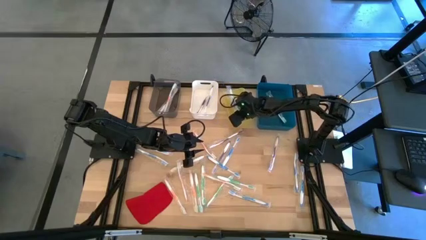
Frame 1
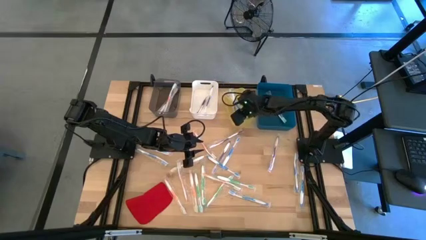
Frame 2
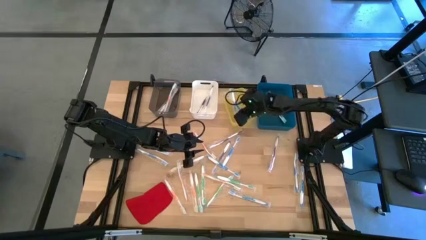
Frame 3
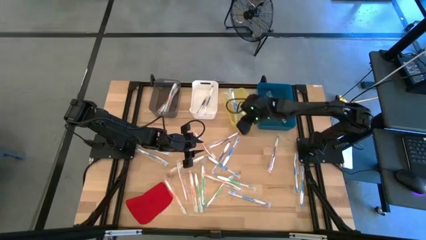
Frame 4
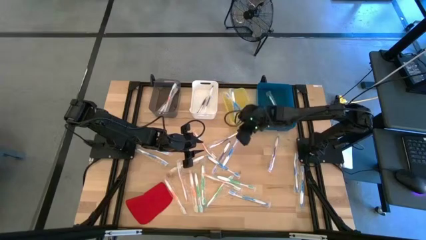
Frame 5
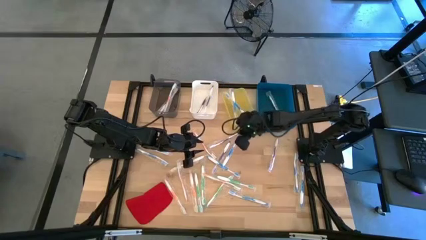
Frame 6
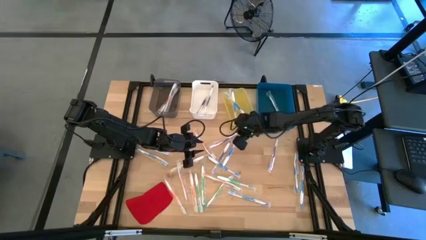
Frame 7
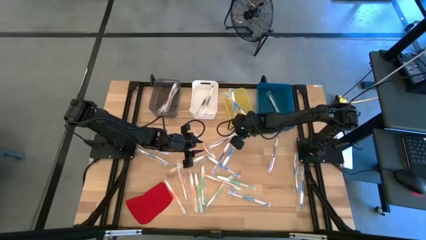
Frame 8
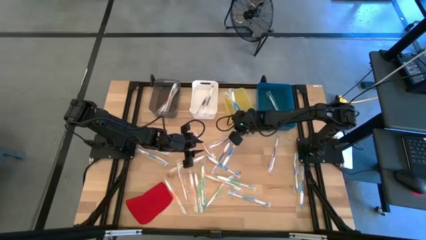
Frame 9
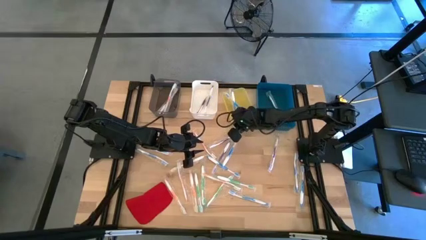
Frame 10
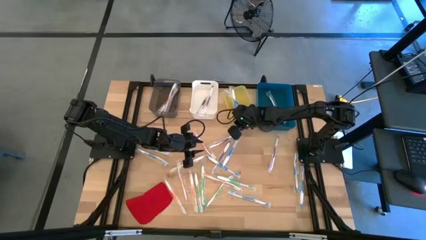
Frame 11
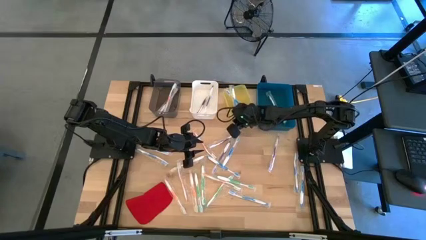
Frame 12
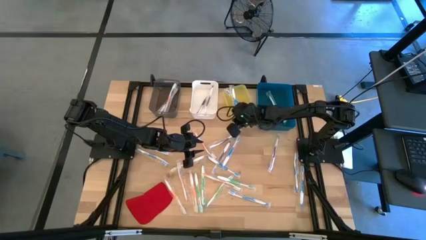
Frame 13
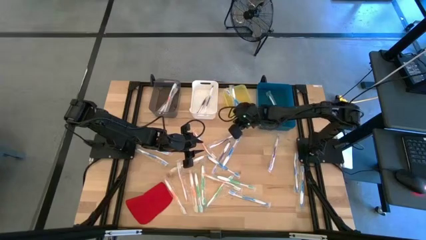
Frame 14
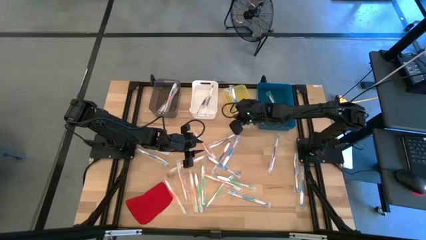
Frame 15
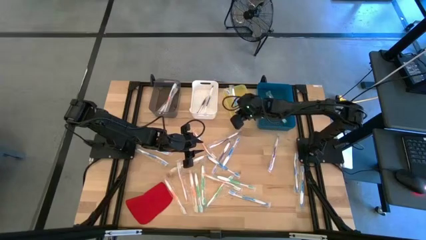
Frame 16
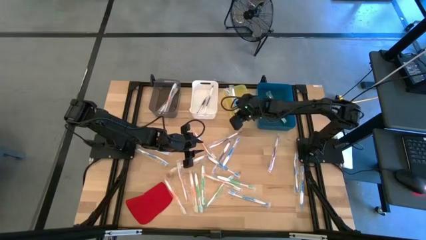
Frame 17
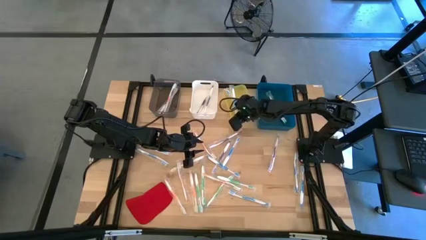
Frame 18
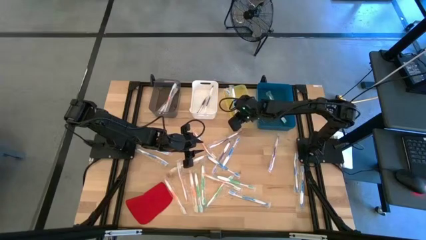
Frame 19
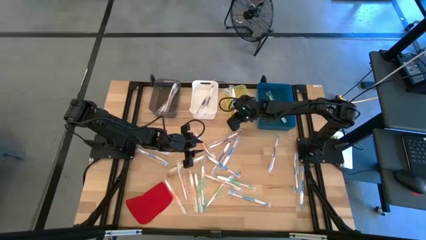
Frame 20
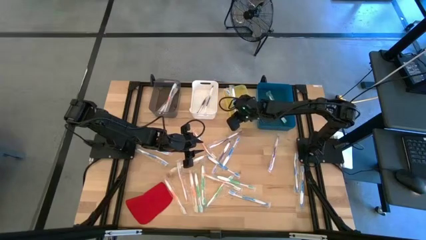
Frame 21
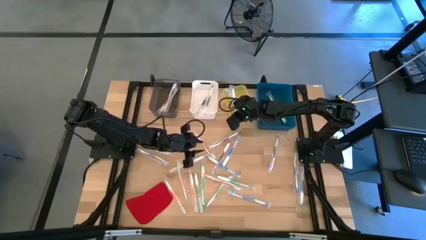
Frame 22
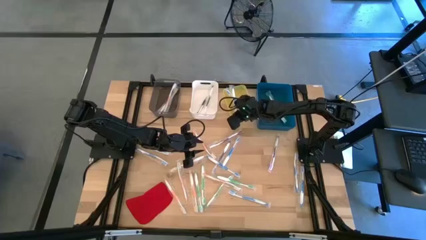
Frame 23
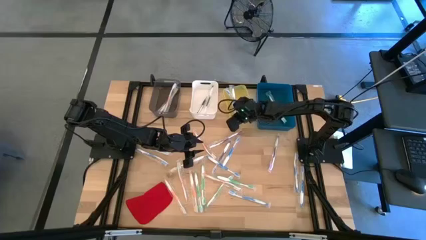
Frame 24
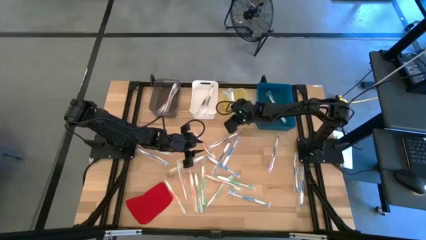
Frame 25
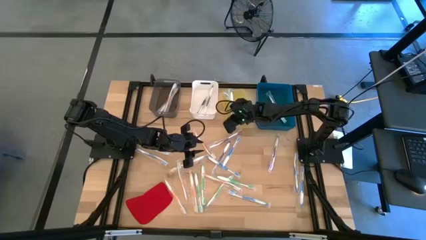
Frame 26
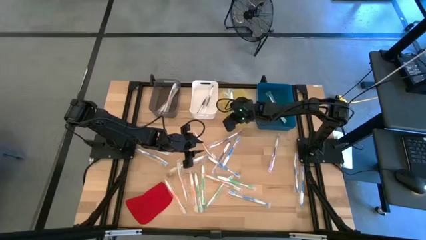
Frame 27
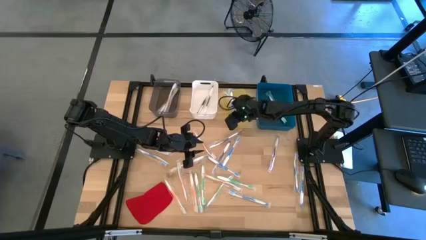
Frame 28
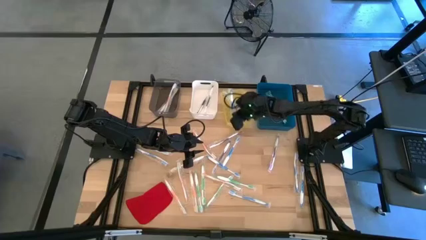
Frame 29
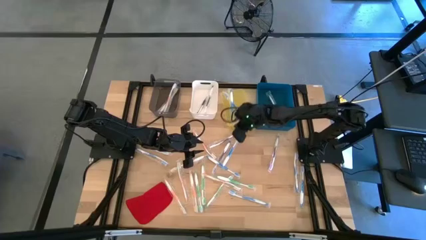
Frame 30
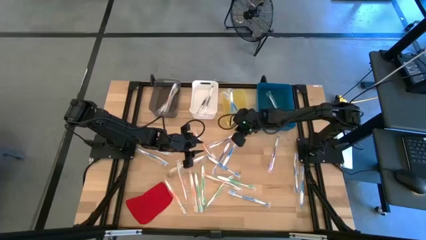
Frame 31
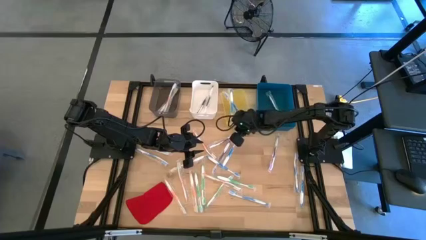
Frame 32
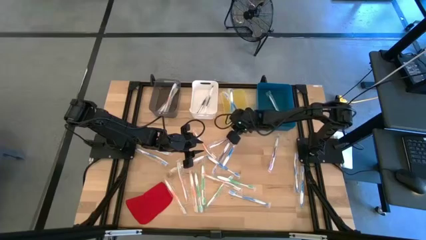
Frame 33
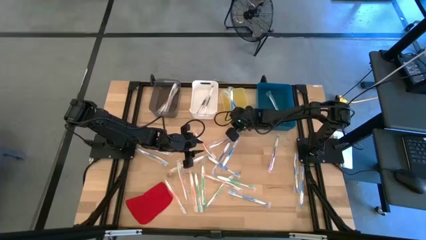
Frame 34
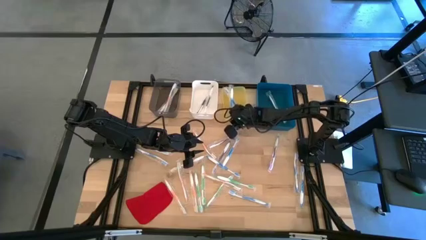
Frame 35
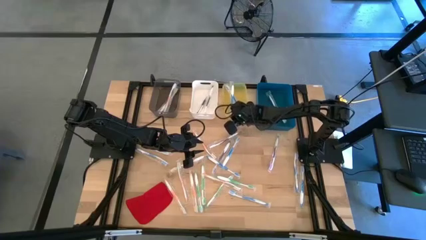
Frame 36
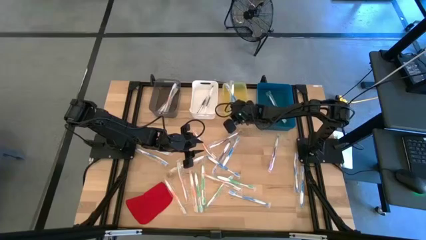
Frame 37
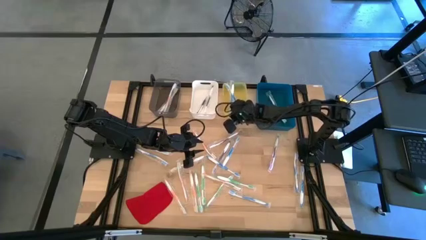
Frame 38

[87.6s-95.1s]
Task: Pick & Place Toothbrushes
Adjust the yellow bin on the table

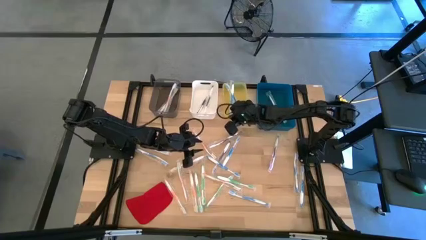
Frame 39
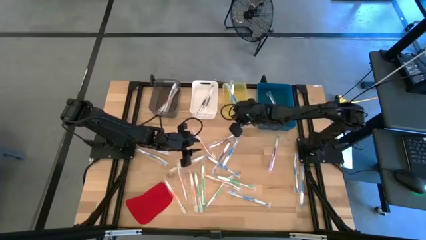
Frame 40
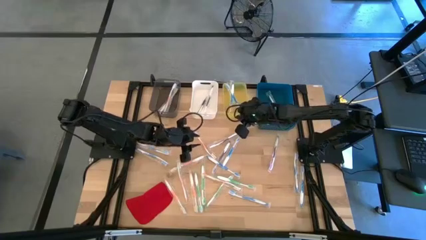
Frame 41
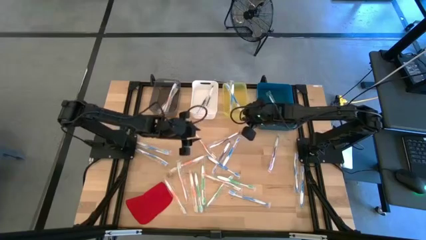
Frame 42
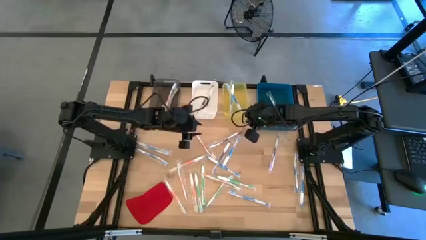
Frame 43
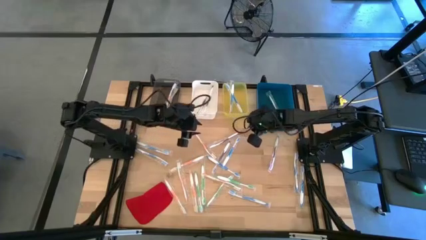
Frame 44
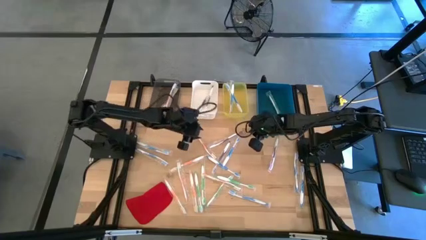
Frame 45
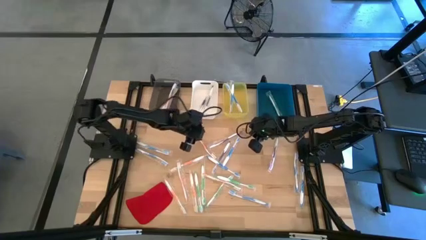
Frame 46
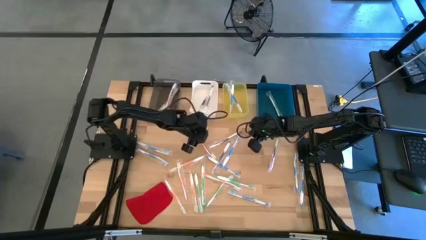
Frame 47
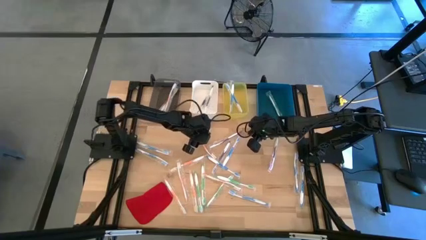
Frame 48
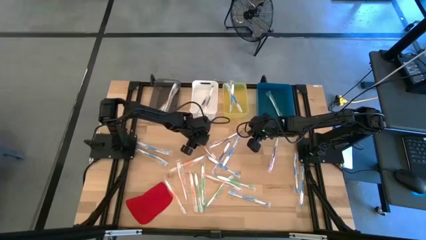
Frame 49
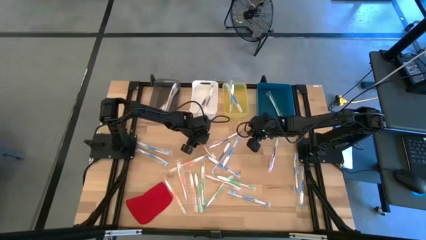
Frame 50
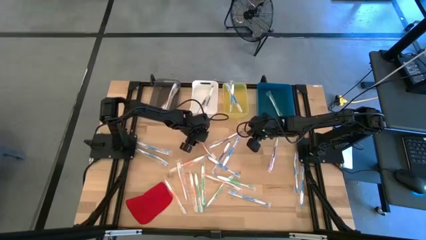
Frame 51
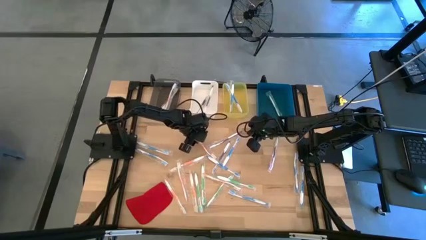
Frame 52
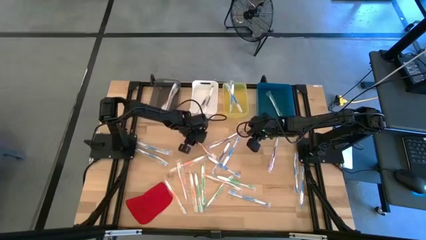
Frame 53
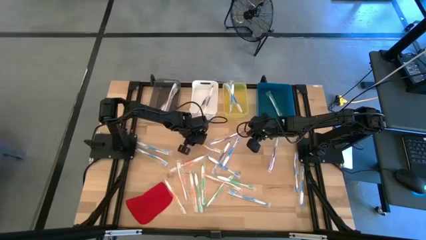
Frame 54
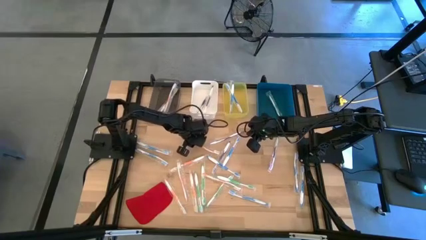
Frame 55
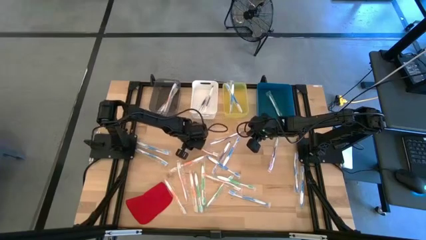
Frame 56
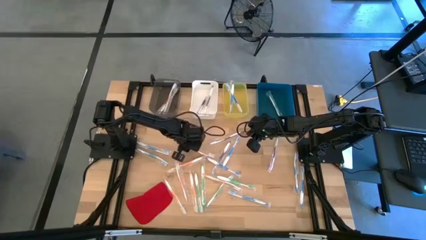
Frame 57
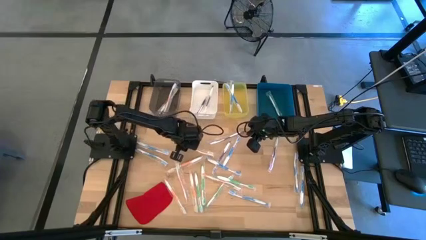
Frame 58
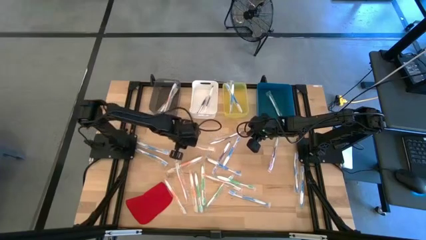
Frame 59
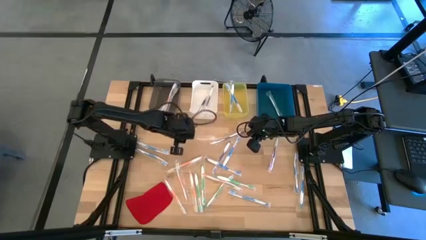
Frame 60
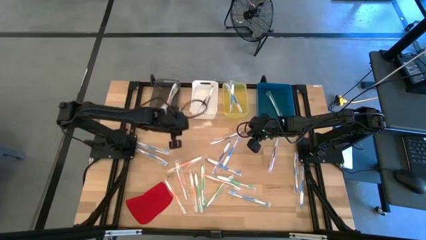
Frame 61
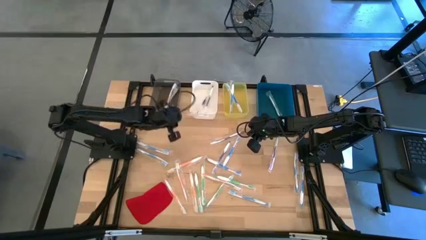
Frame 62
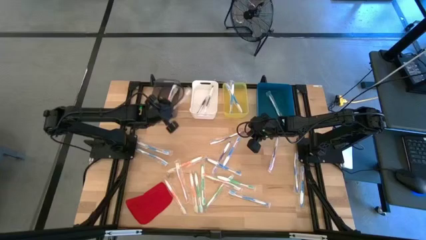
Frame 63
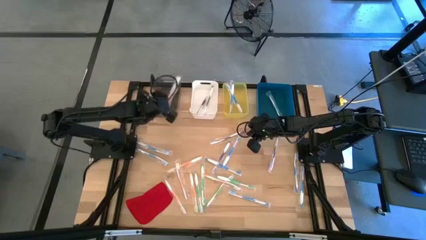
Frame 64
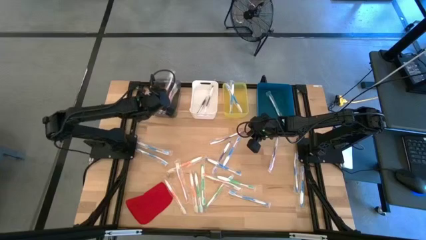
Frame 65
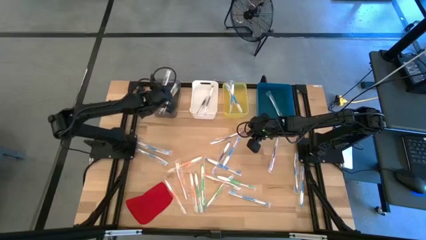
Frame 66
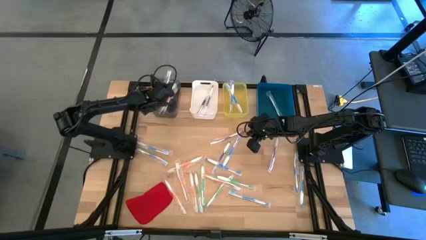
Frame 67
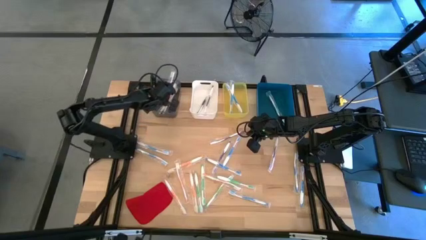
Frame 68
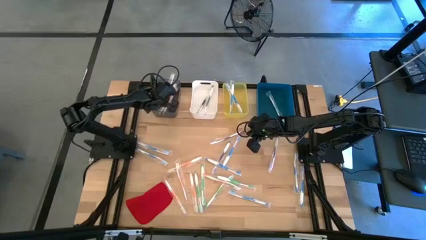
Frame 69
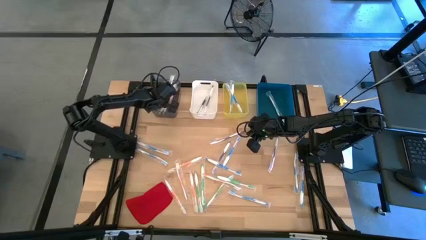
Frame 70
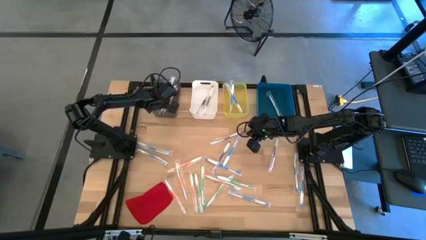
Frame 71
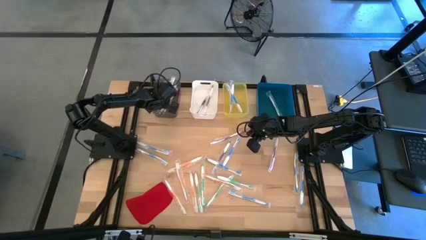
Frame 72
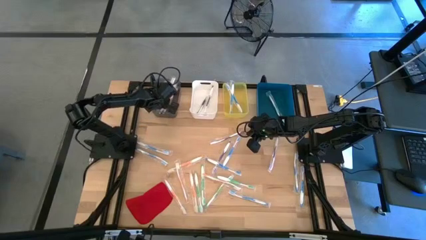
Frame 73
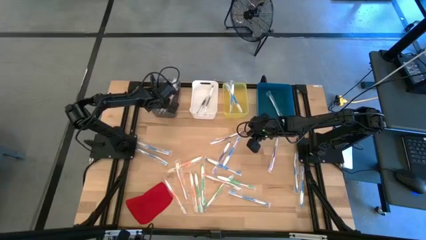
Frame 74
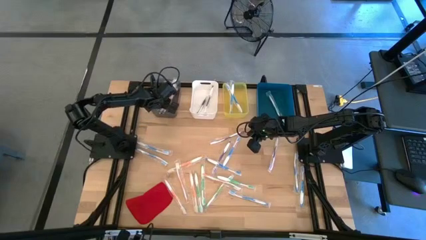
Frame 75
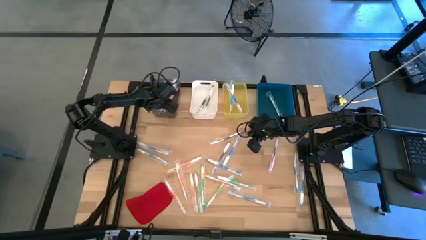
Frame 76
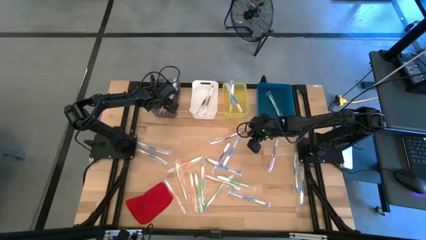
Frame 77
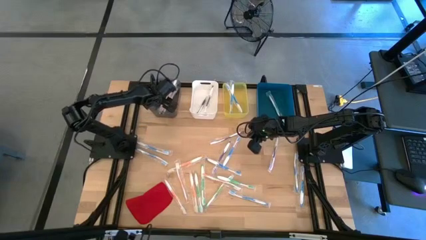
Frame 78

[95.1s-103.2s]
Put the orange toothbrush into the black bin
